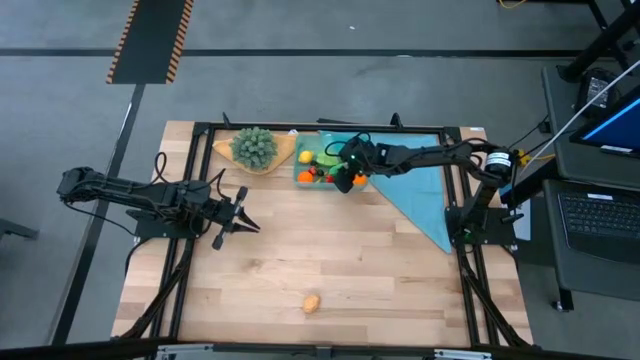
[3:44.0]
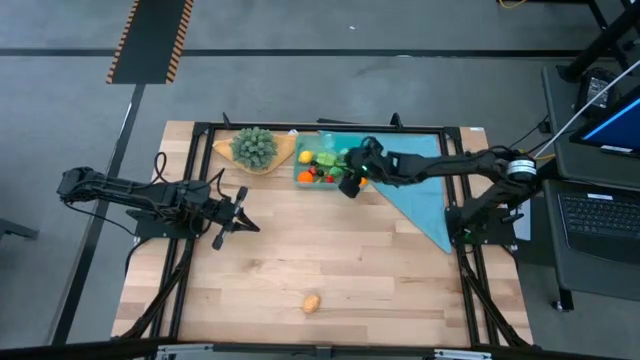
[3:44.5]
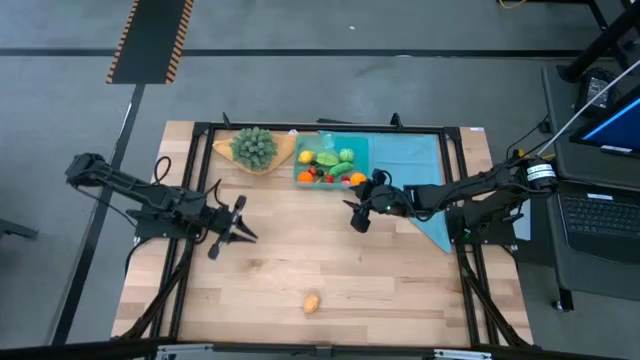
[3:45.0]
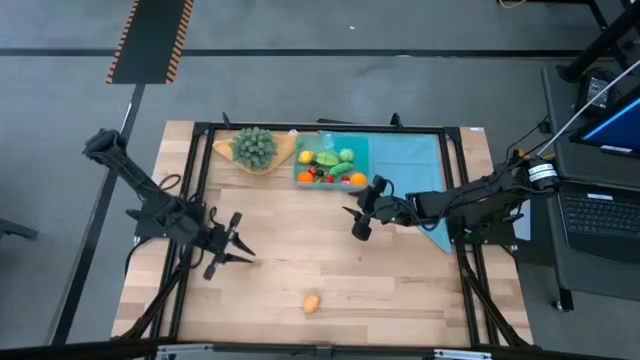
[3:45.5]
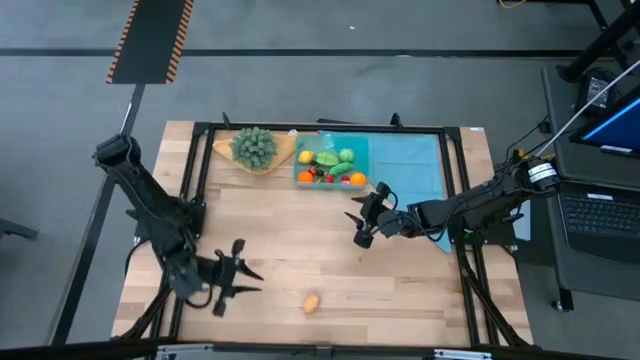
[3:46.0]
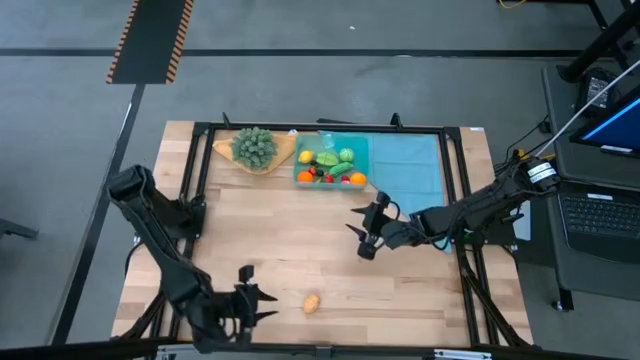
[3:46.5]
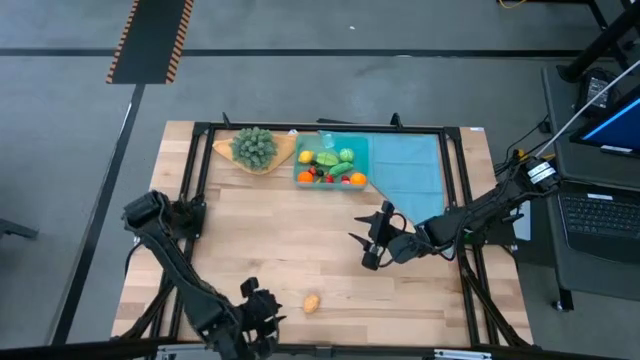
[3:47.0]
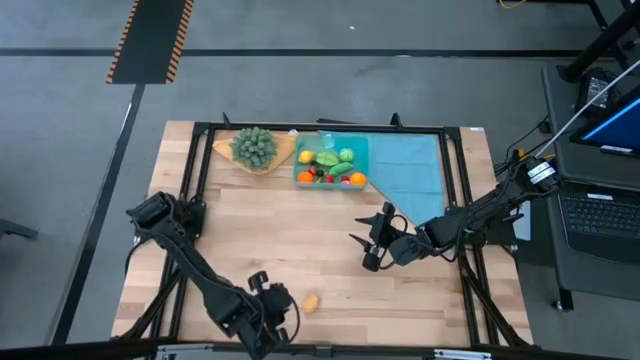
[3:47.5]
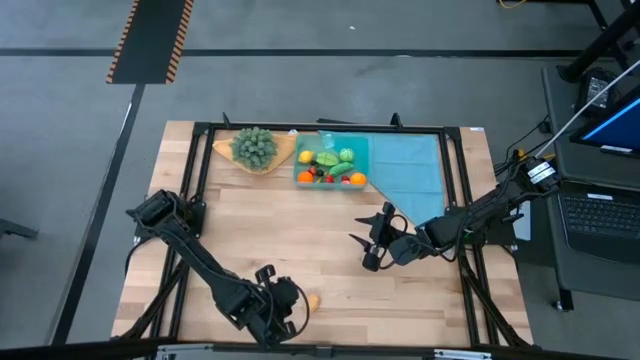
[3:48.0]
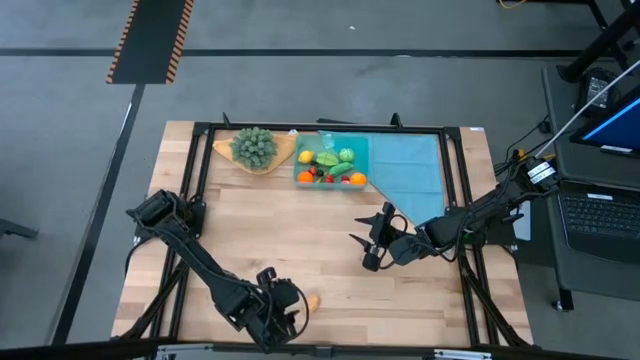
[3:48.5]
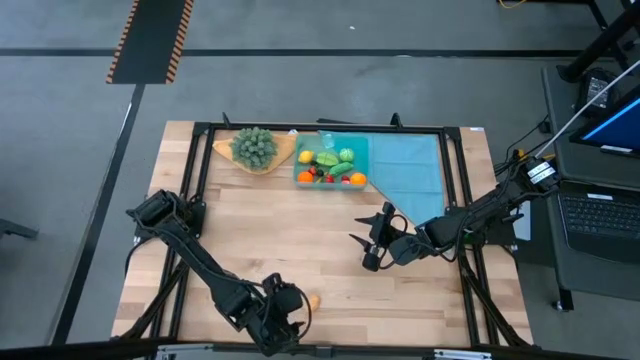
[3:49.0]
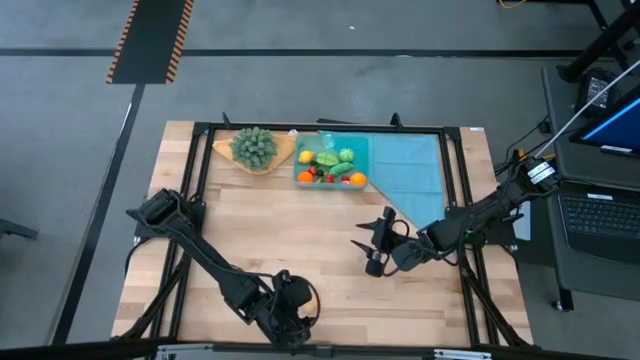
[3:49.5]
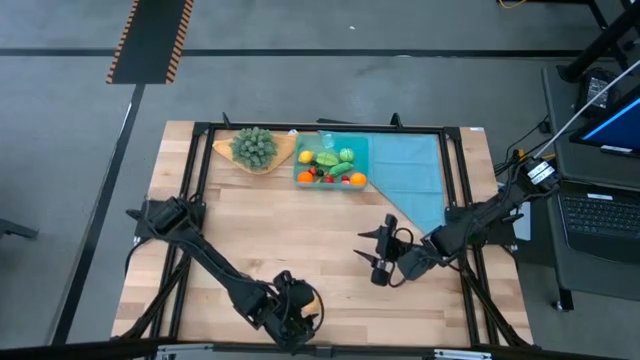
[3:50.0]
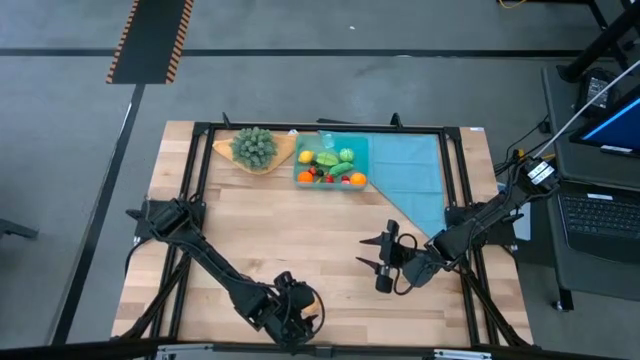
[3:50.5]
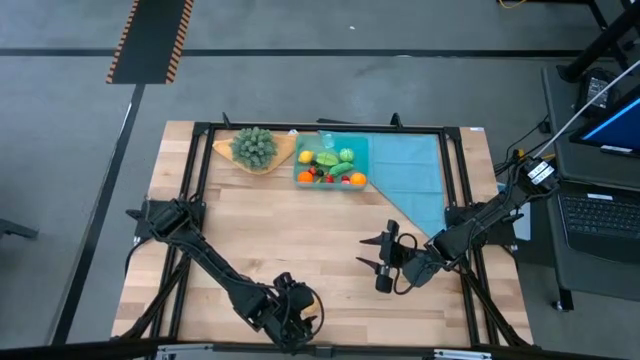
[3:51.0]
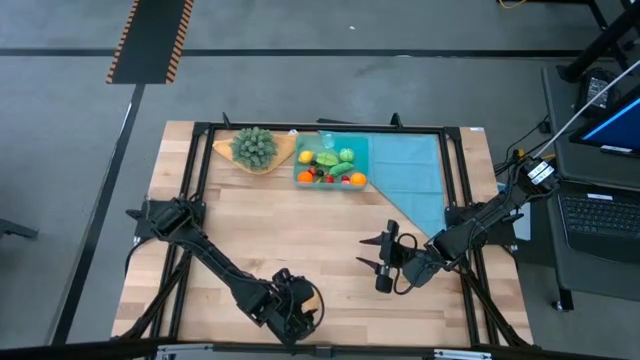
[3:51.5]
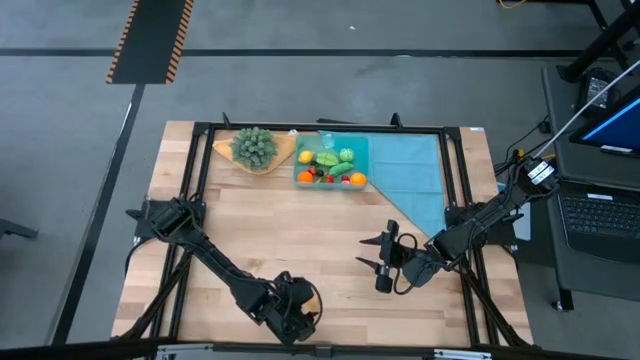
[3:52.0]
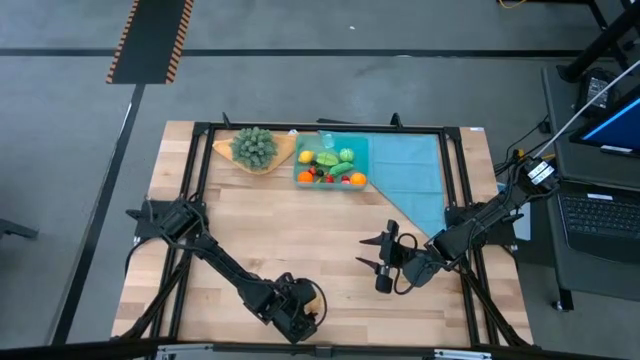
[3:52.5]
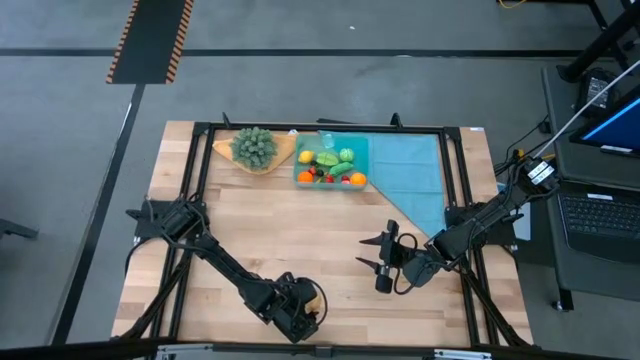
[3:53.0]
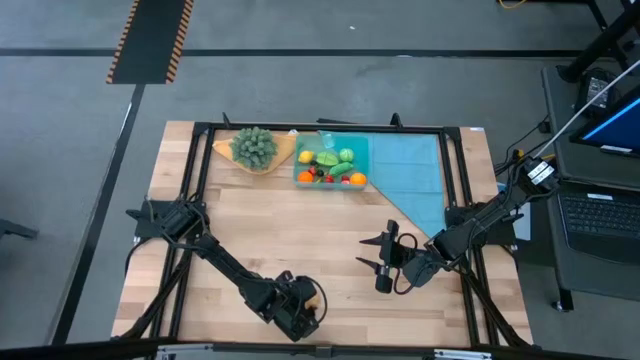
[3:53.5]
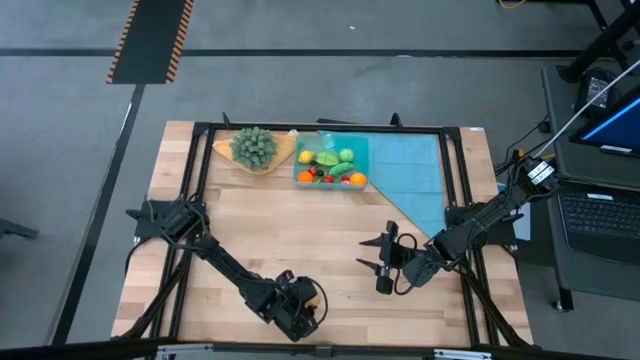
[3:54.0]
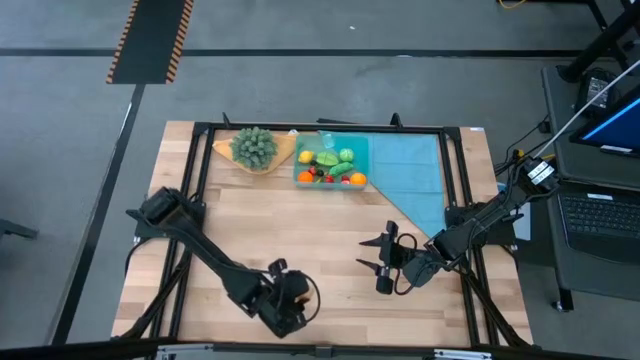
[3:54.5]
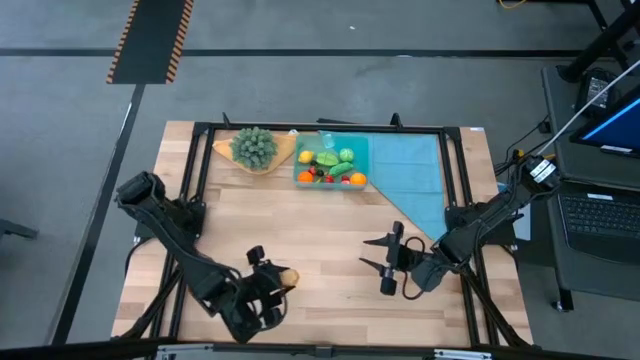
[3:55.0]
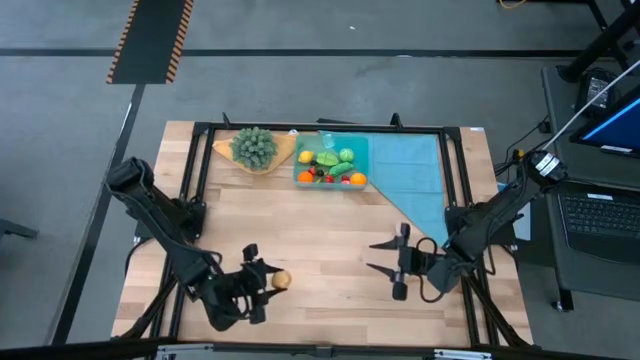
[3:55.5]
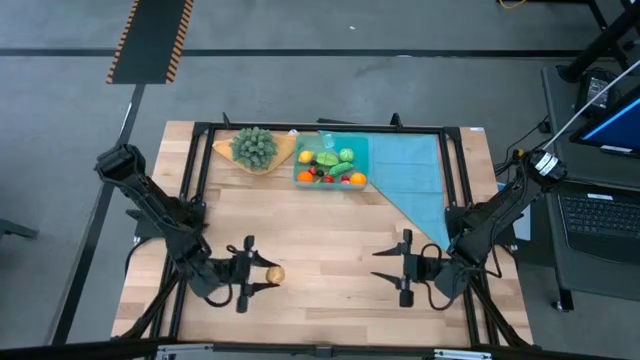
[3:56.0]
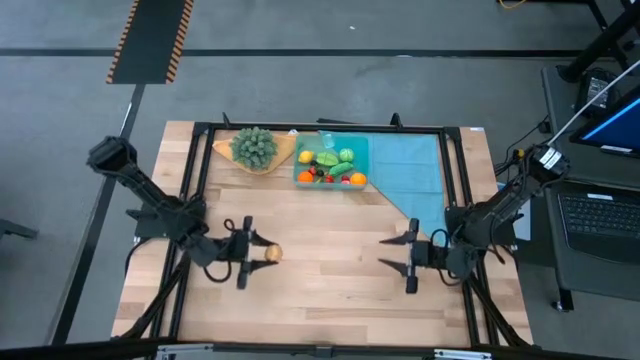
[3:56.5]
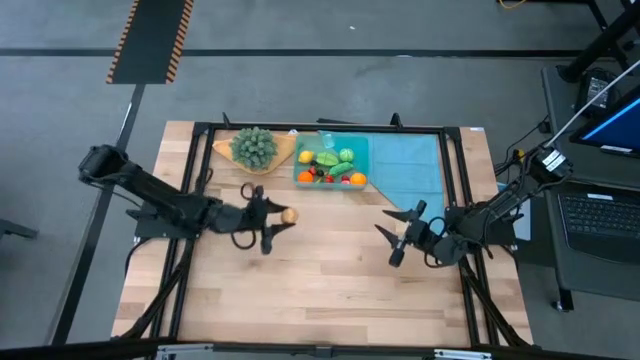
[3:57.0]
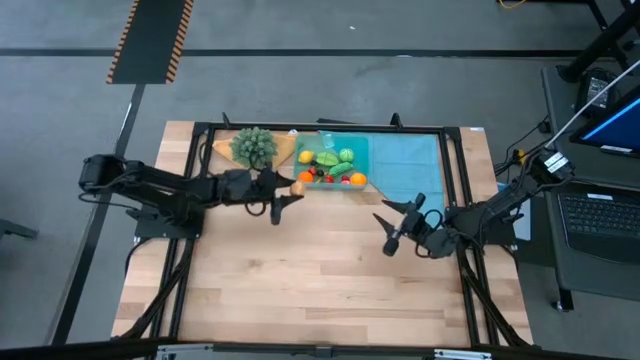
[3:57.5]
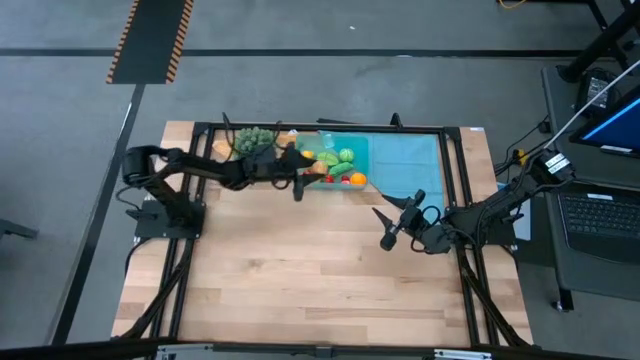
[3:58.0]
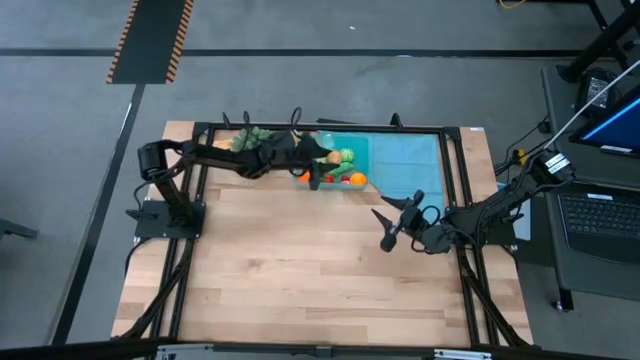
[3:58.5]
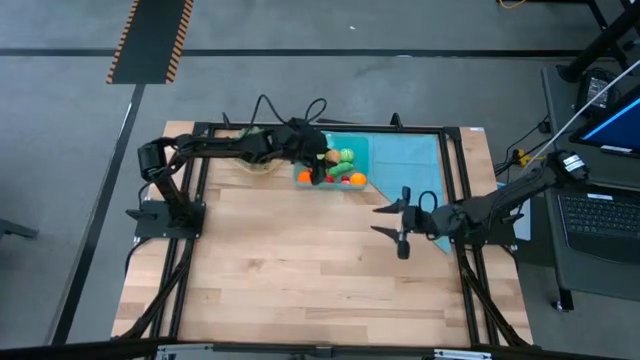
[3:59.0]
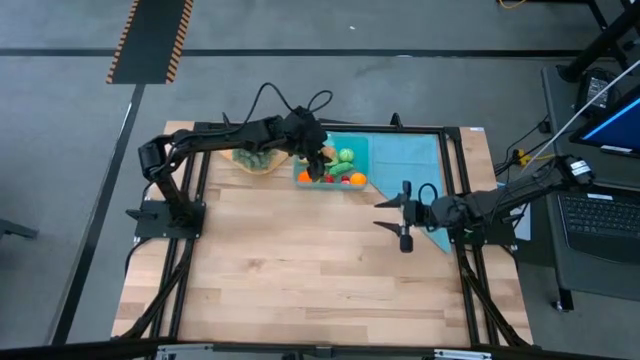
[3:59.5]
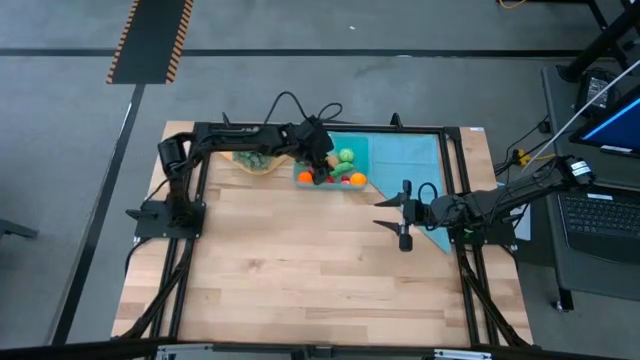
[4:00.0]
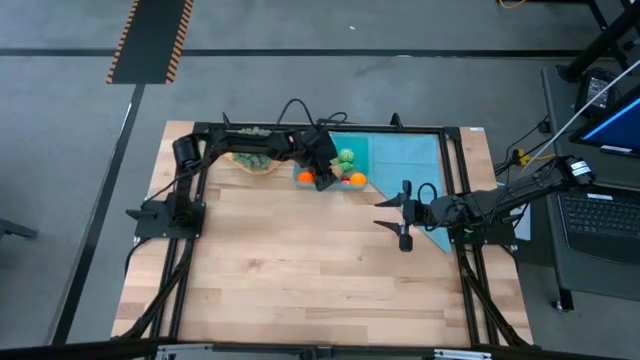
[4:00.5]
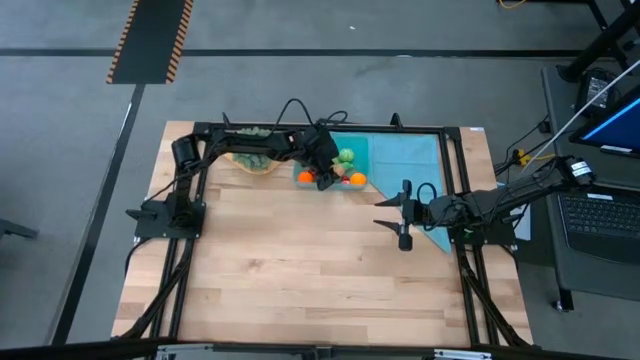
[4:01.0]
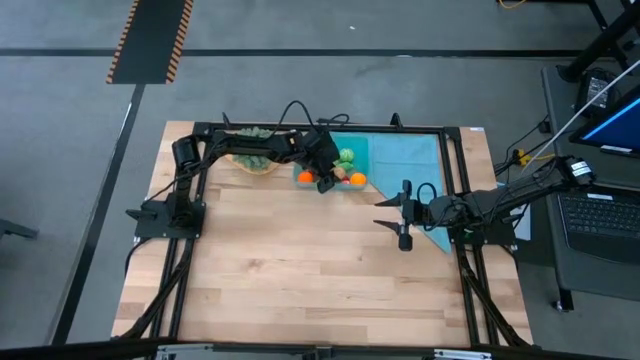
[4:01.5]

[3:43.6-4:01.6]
Task: Pick and placing Produce into tupperware
Put the potato into the blue bin

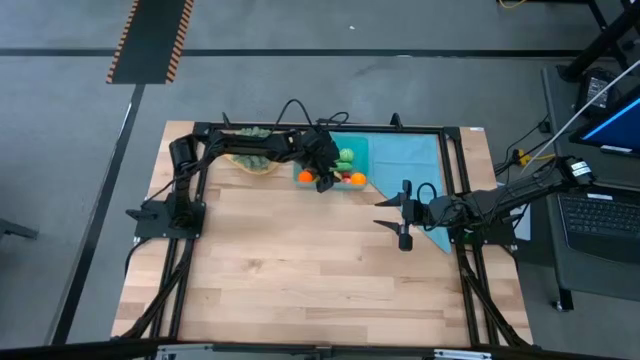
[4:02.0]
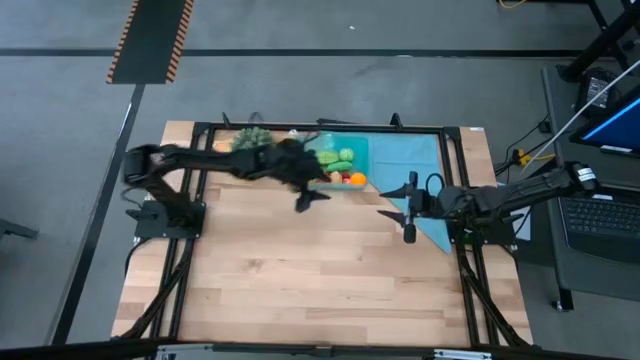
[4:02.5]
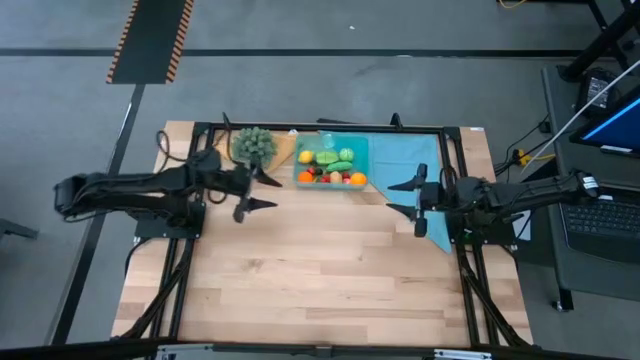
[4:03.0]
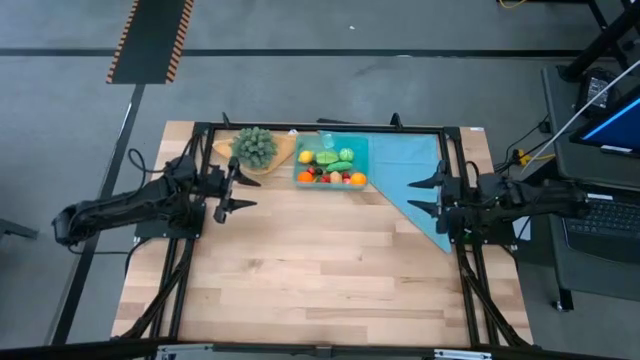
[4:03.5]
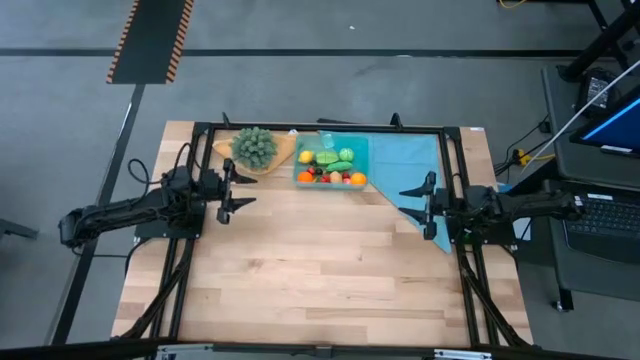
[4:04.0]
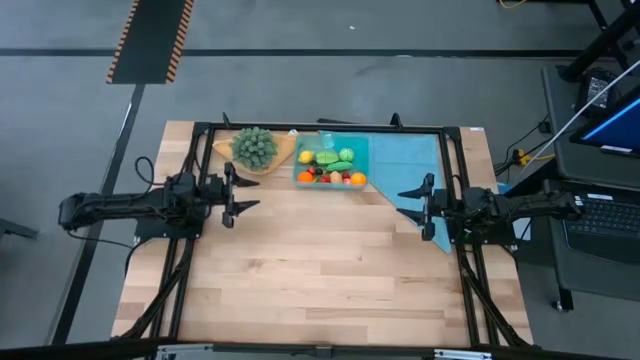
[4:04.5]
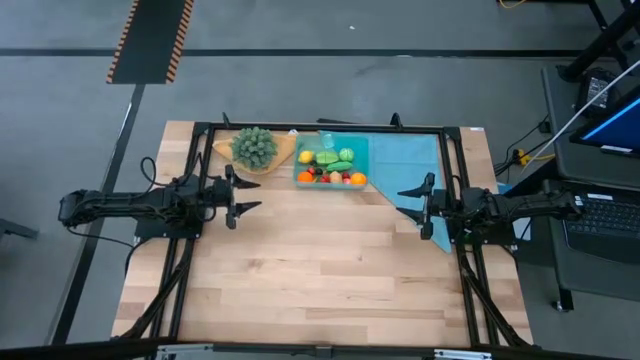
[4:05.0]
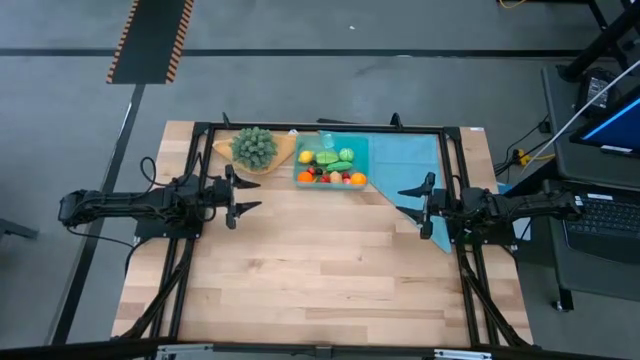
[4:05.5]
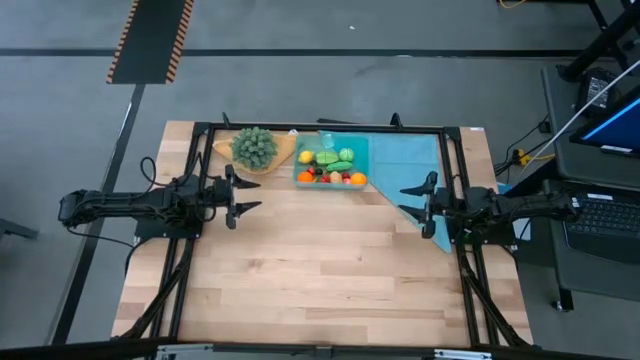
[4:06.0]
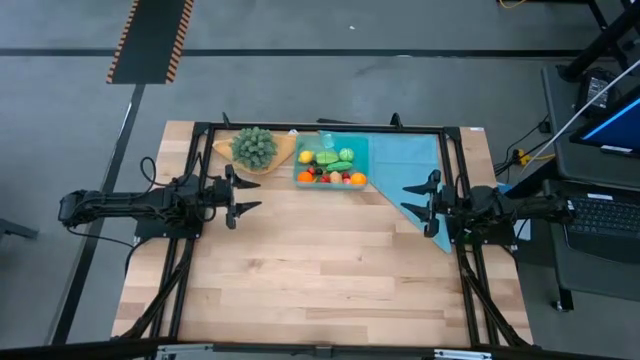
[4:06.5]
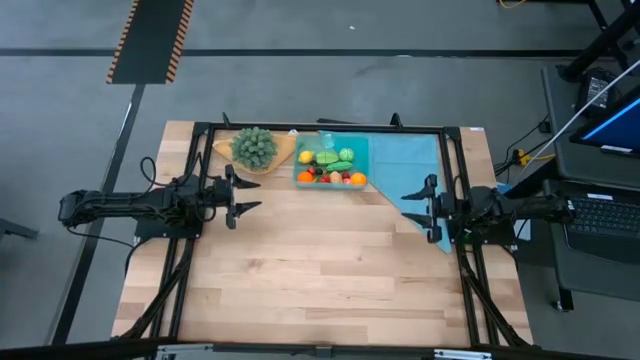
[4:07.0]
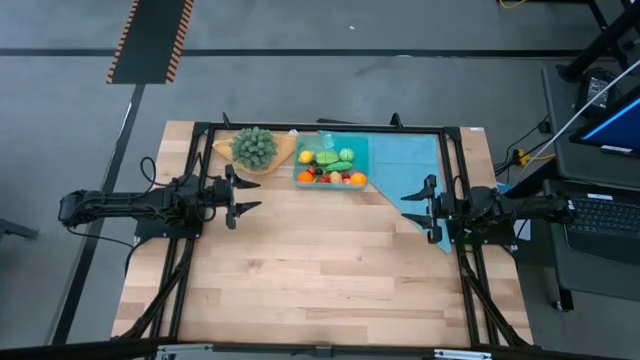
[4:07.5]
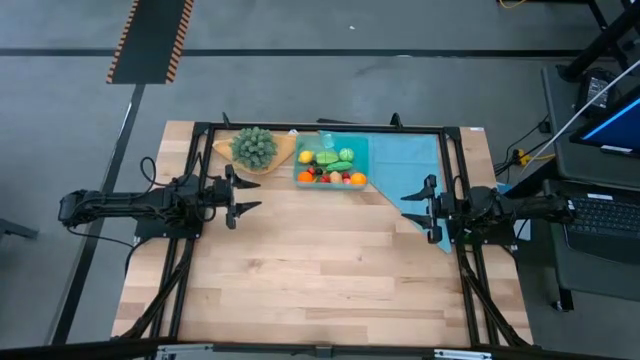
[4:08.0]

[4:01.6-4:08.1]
Return to Home Position
